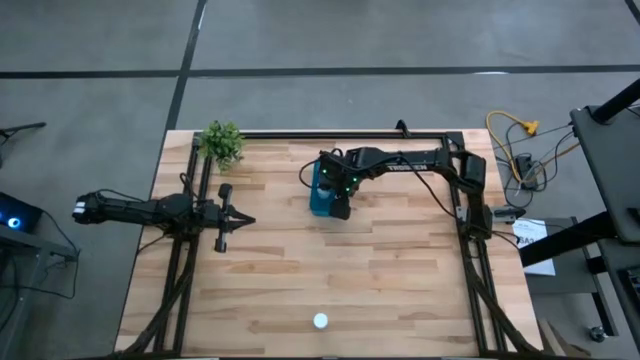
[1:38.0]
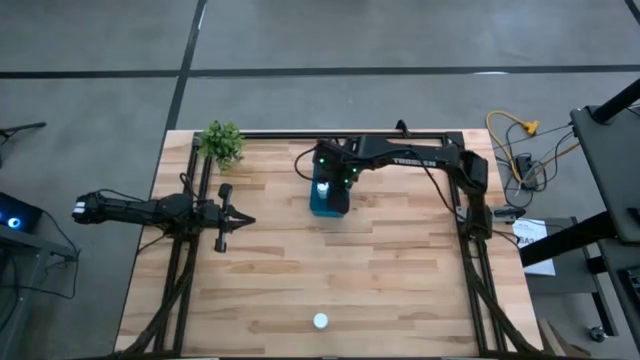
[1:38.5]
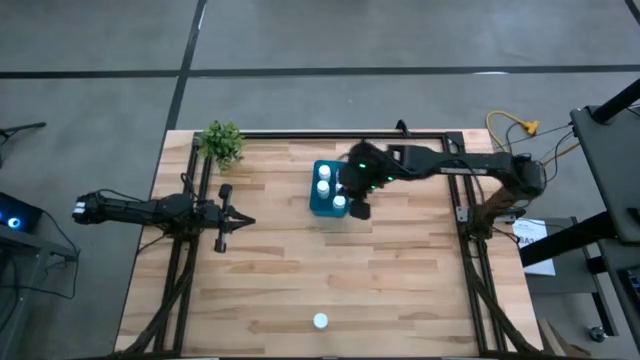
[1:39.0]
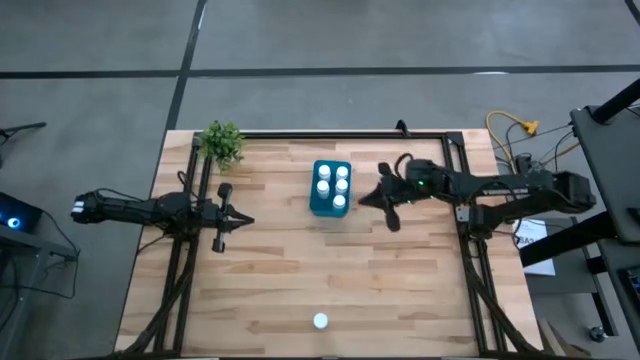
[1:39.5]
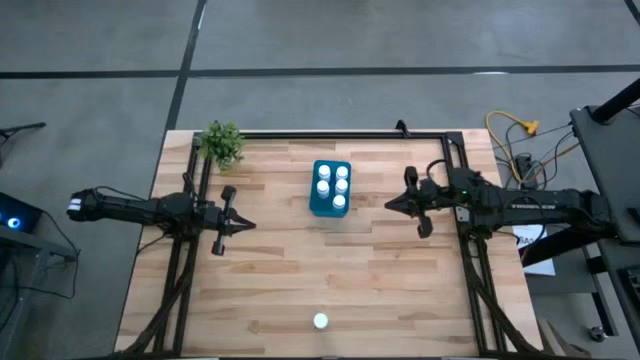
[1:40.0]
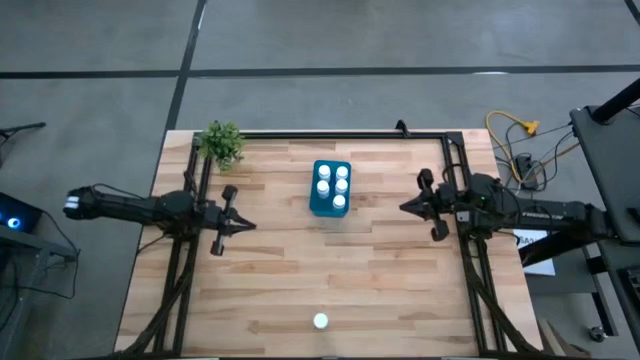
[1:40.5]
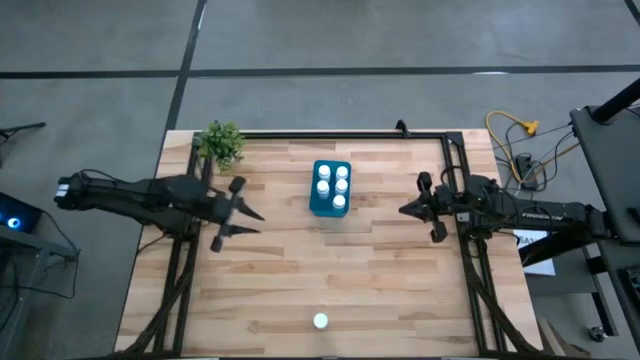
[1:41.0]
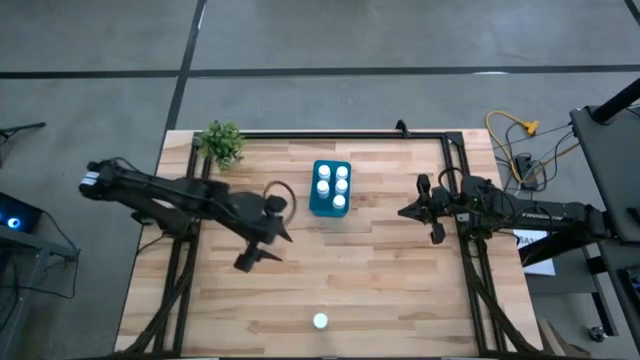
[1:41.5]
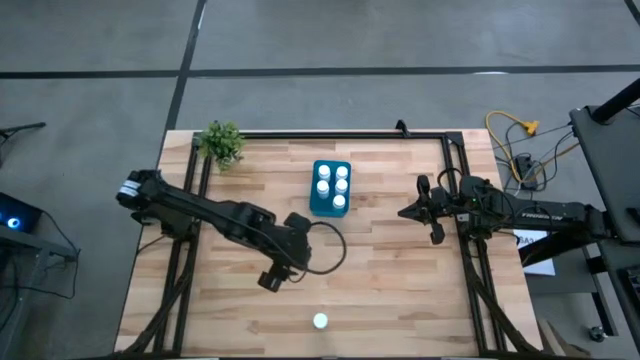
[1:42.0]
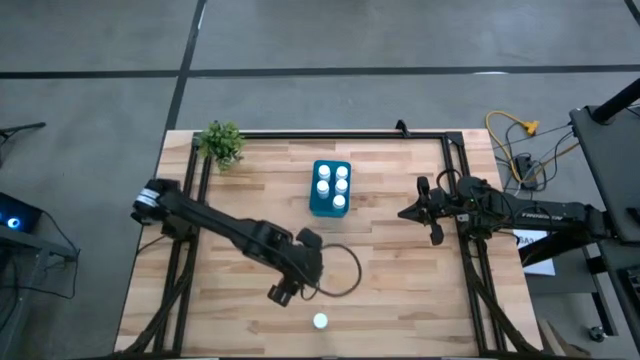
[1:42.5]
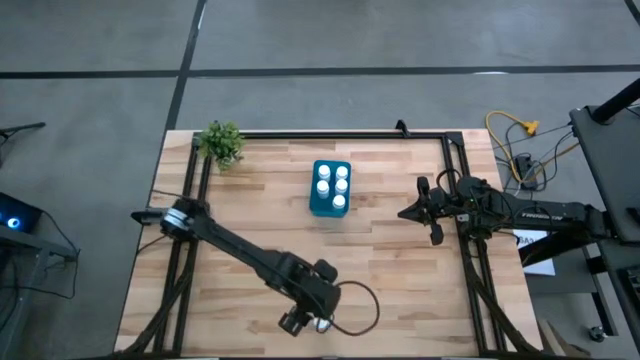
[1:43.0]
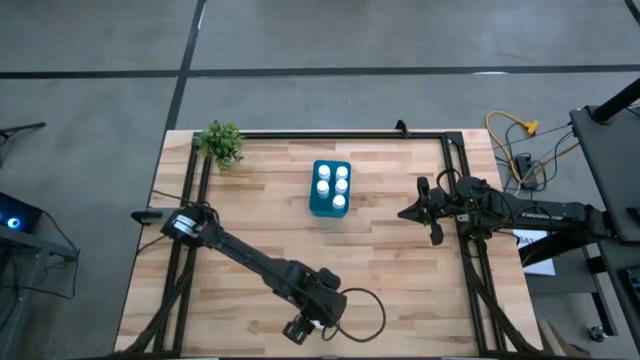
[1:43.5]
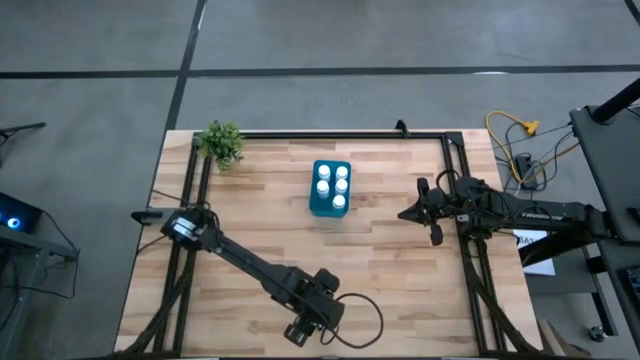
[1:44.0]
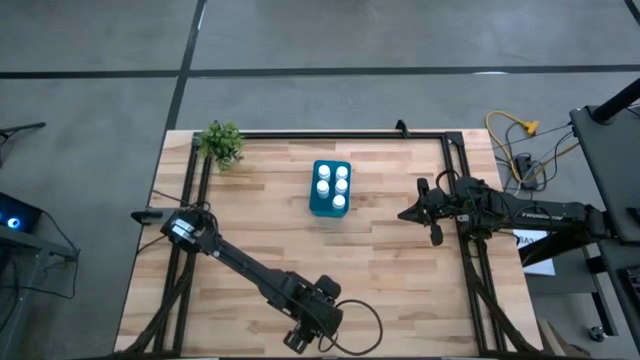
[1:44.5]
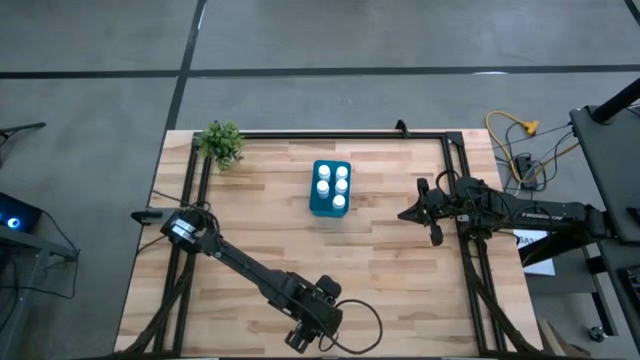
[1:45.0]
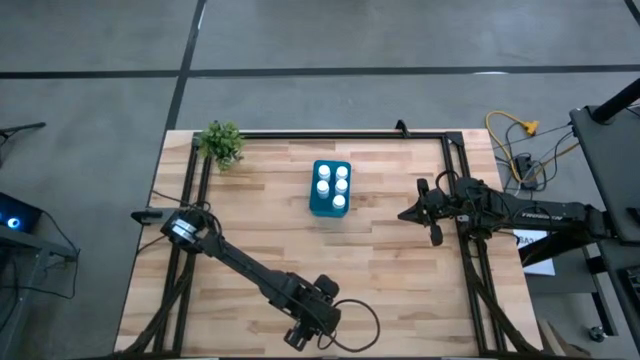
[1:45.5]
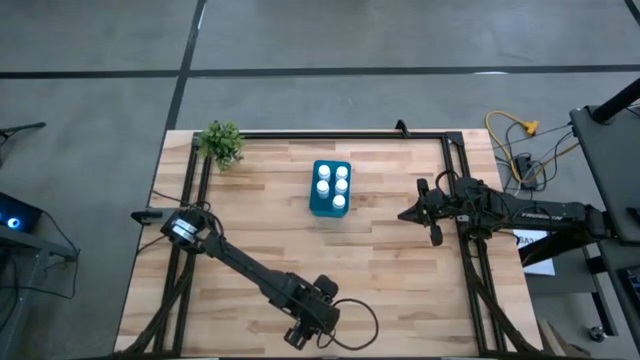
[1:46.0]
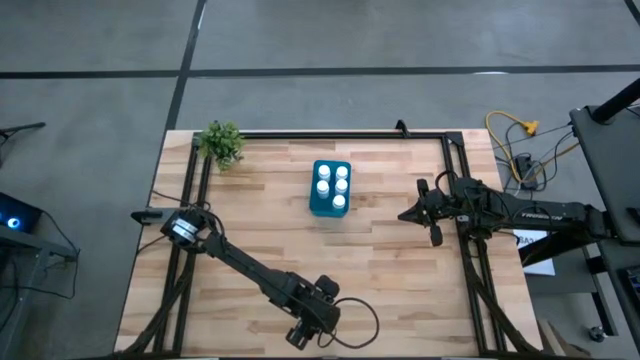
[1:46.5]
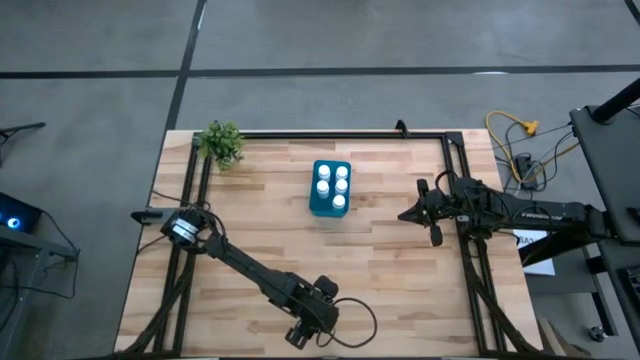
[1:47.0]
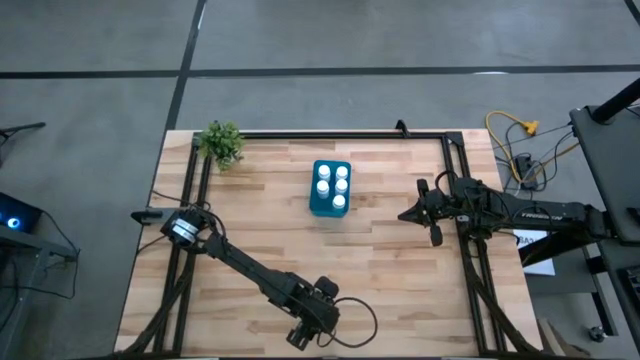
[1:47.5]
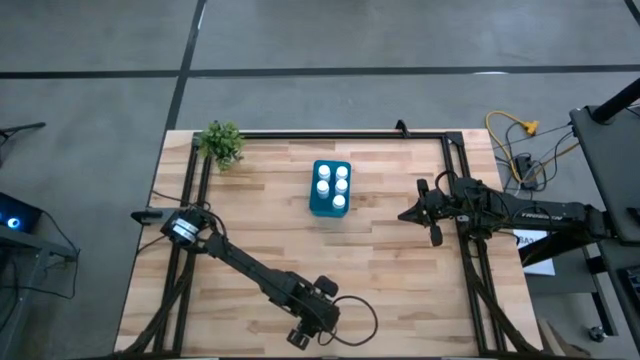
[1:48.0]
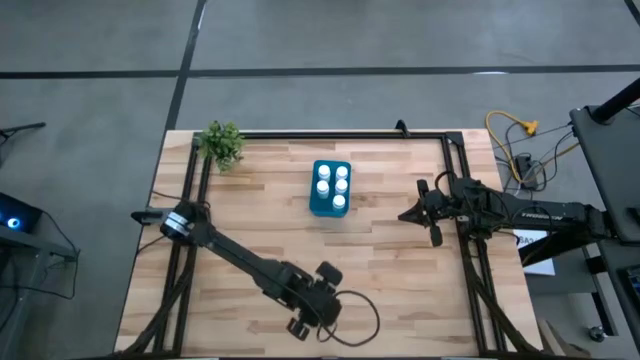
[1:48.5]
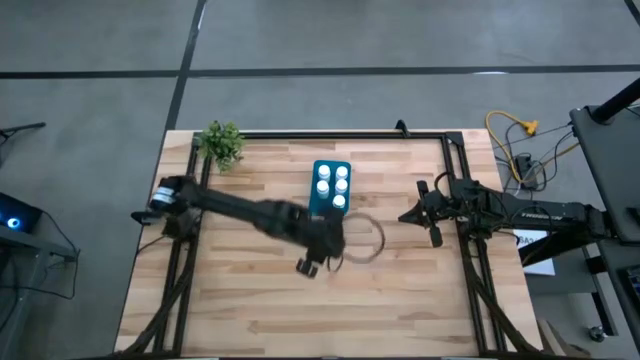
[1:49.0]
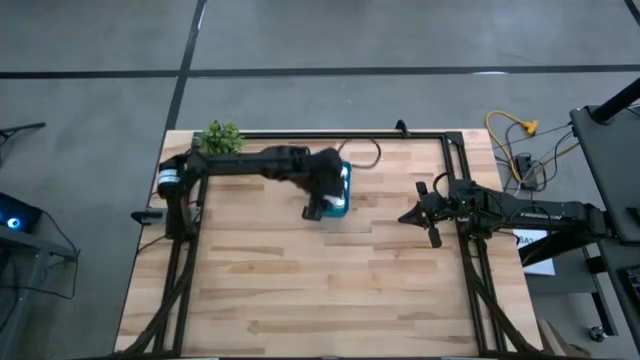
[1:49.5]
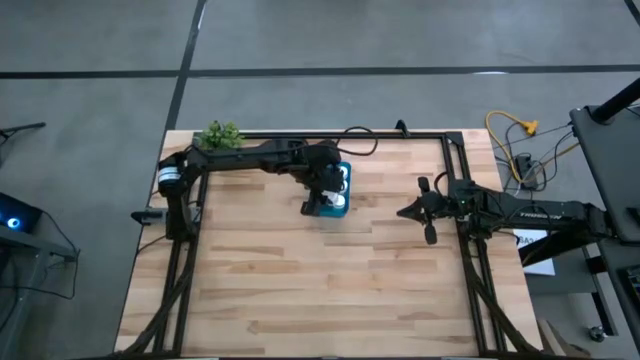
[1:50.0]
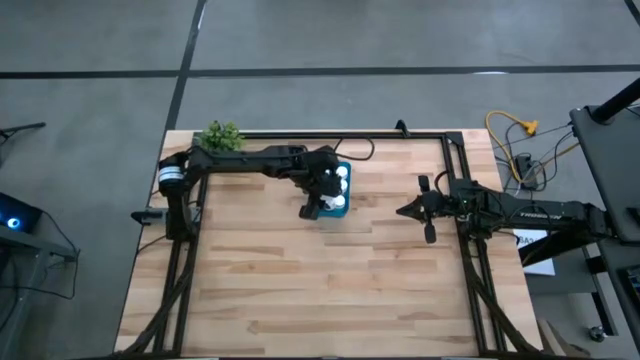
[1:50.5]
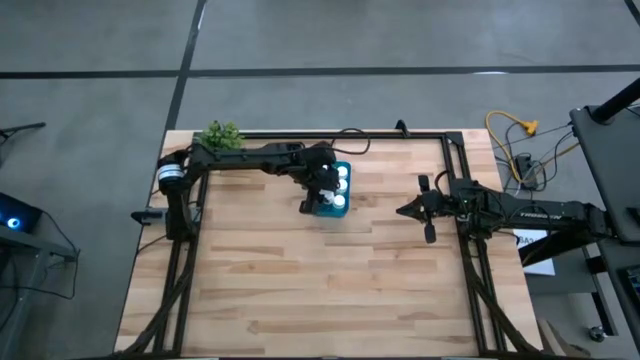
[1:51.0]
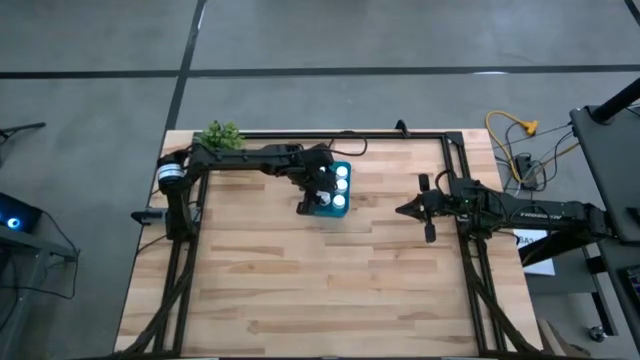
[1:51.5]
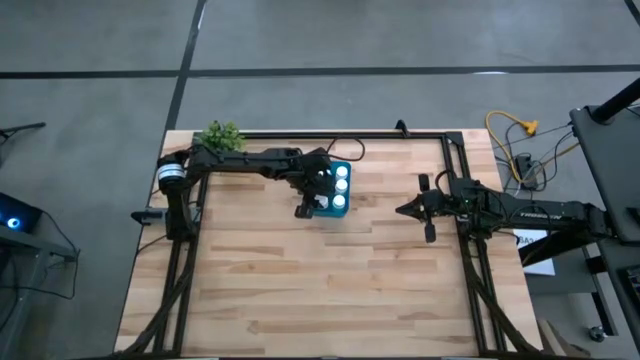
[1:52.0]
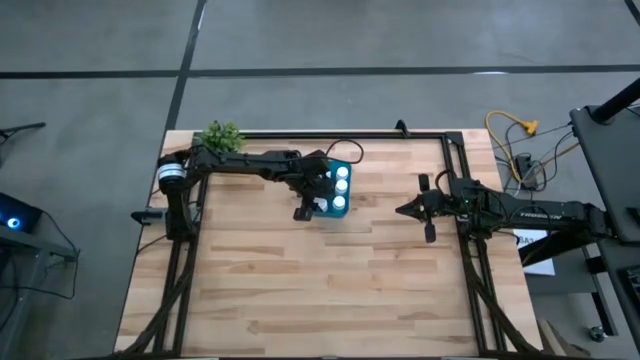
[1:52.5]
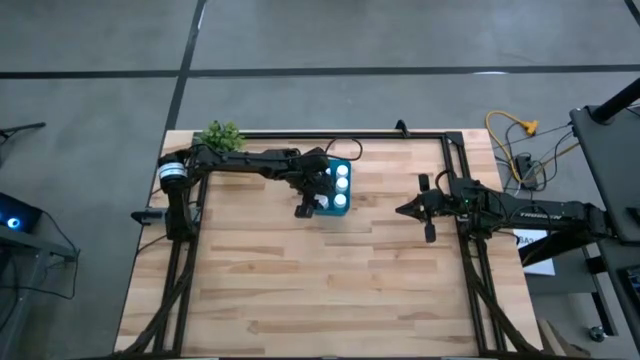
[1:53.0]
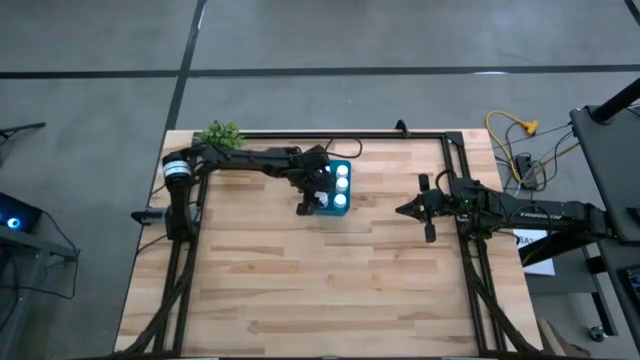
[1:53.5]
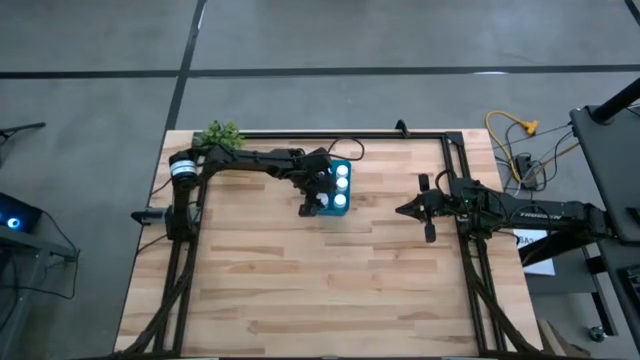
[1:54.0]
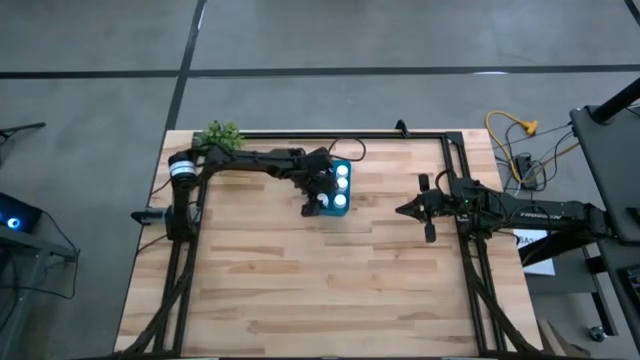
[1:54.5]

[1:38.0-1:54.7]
Task: Pick and place pill bottles into a basket
Put the white pill bottle into the blue bin

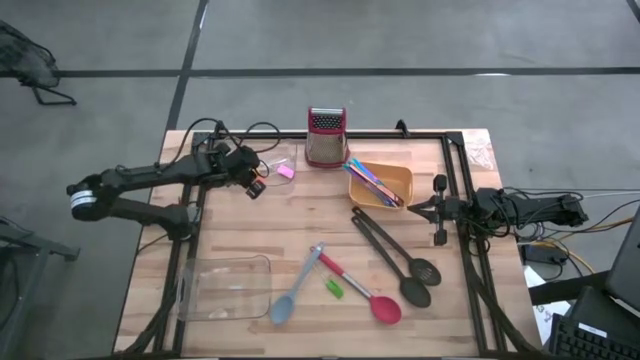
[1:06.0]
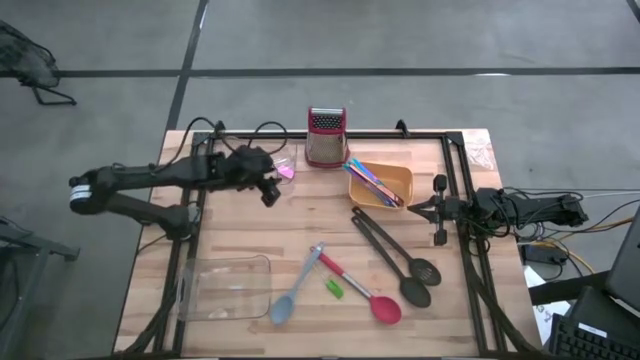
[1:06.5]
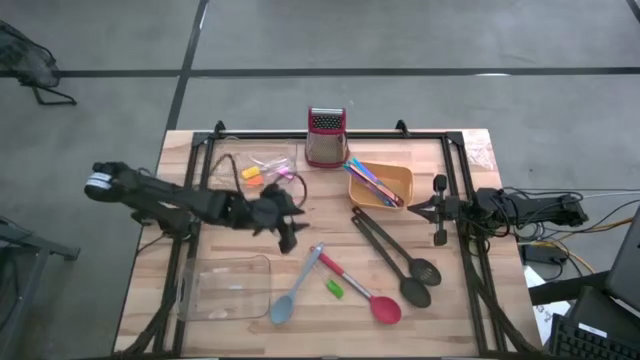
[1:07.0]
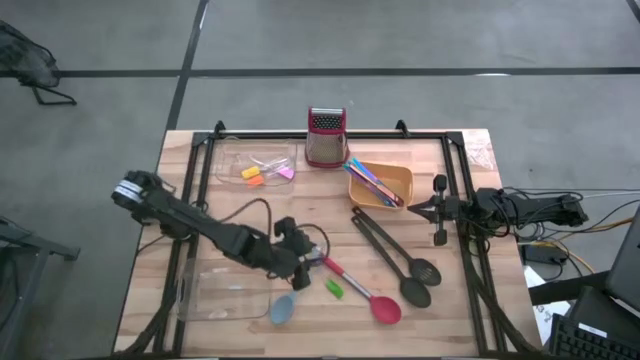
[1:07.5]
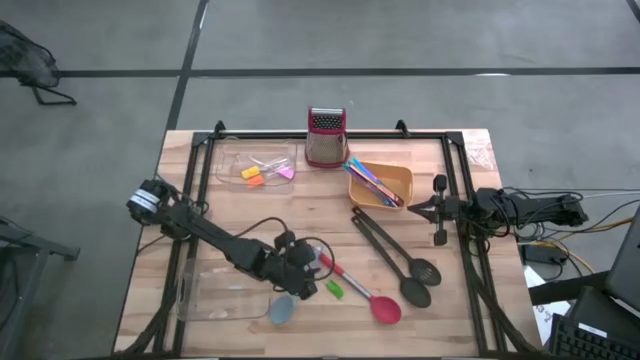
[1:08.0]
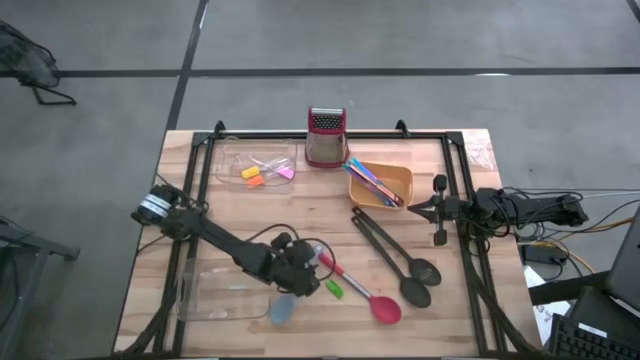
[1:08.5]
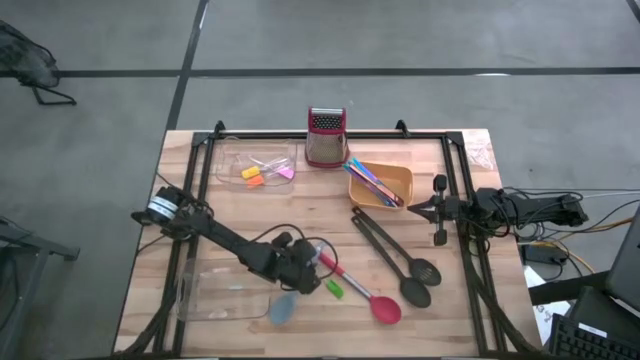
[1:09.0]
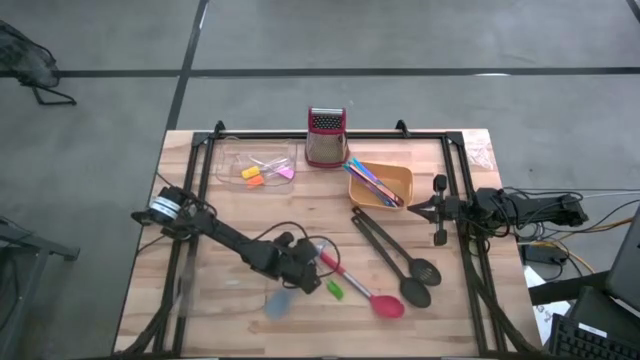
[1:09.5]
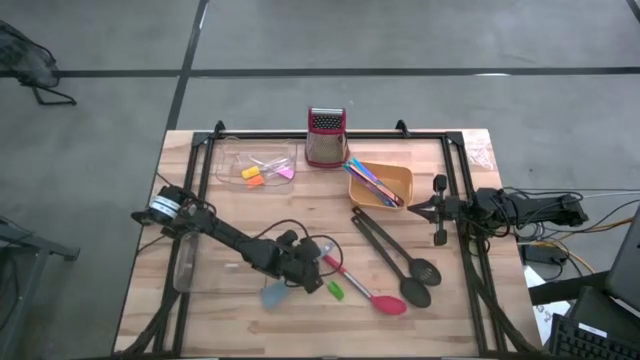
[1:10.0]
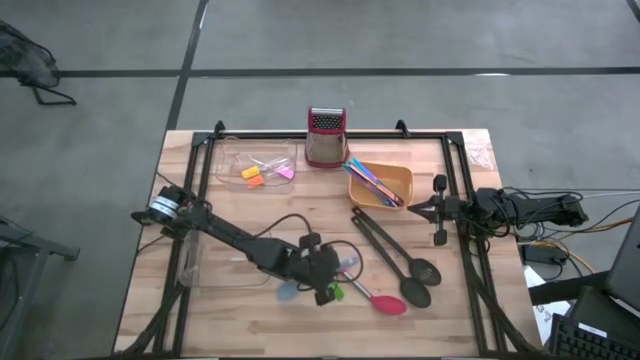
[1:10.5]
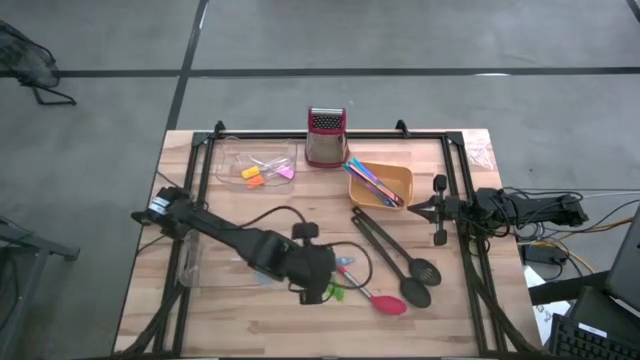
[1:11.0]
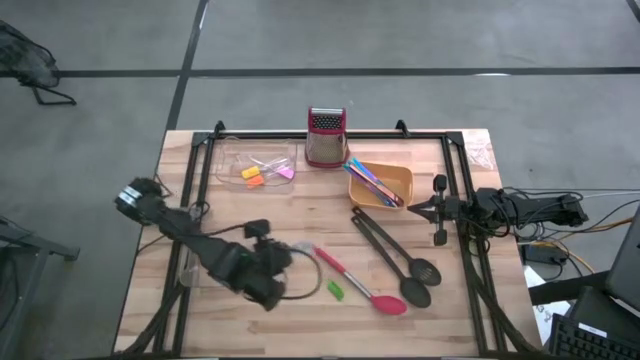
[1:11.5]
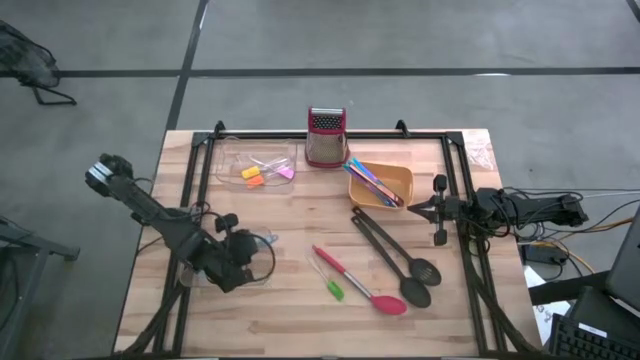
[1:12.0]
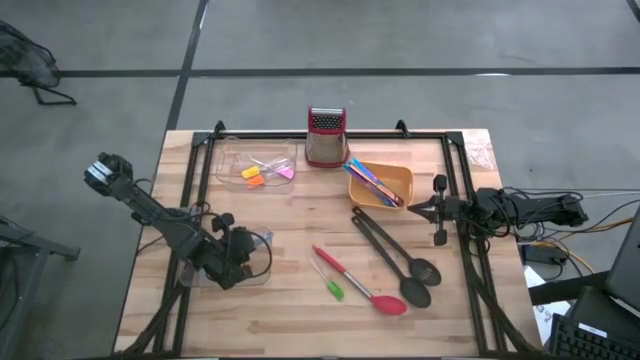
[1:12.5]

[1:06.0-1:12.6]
Task: Pick & Place Kitchen Items
Put the blue spoon into the bottom transparent bin
